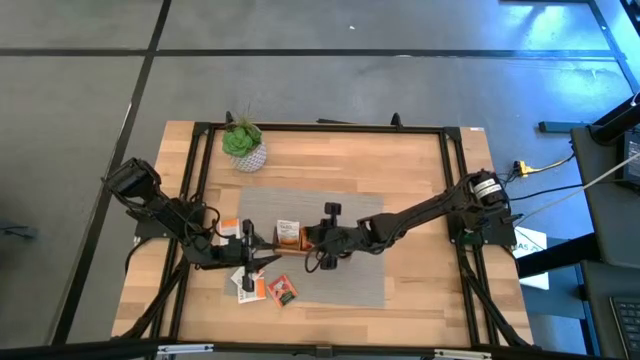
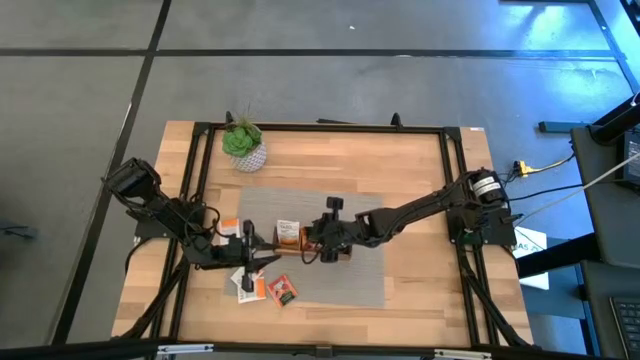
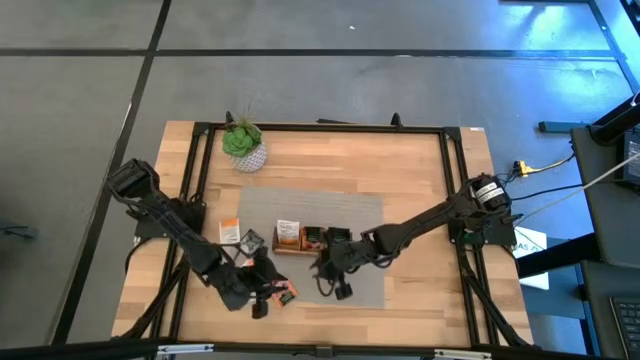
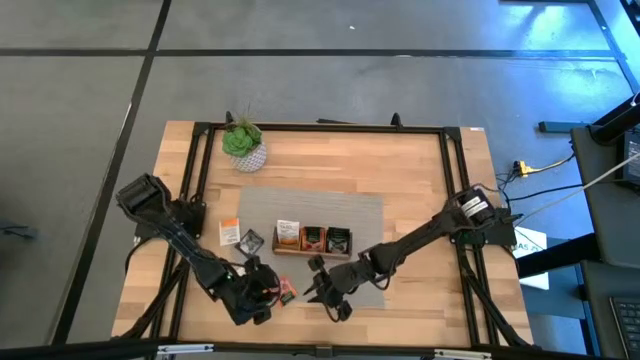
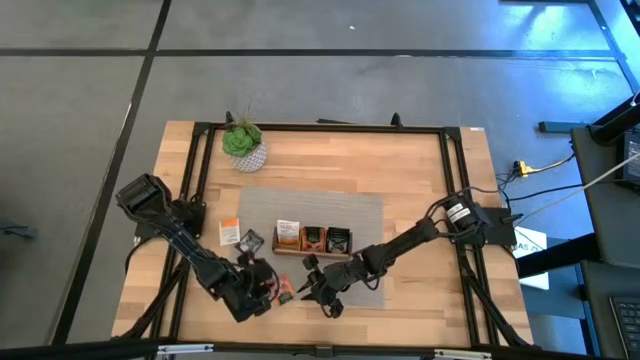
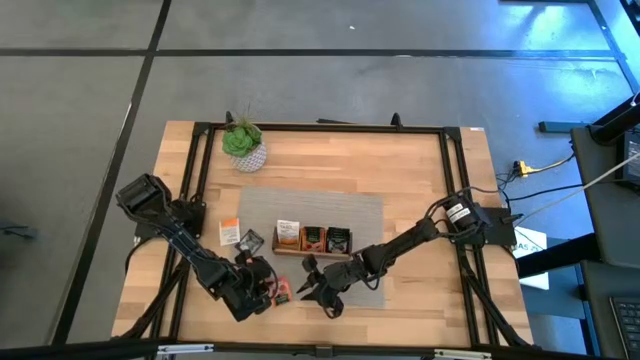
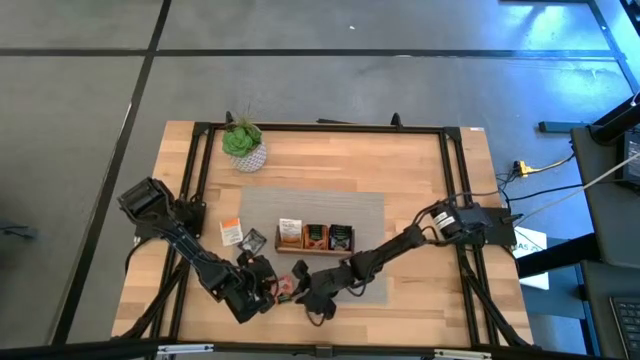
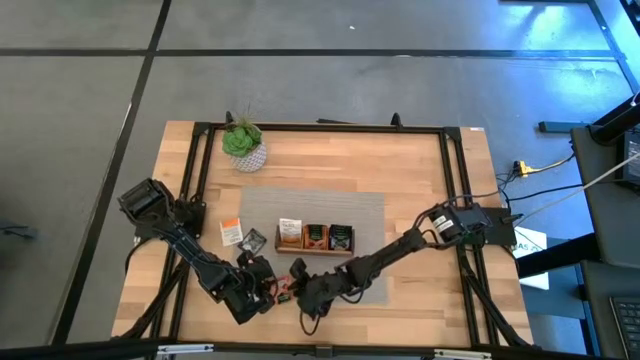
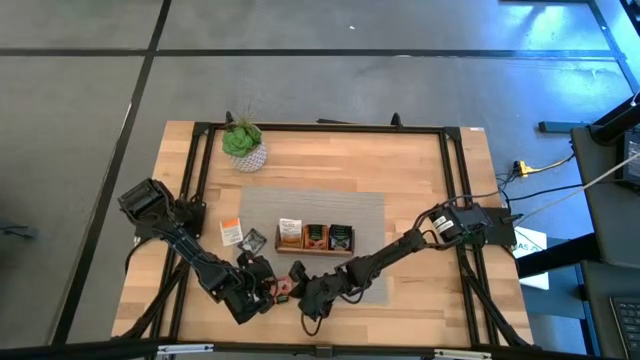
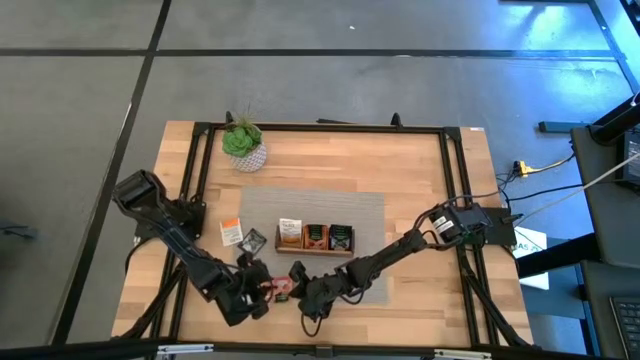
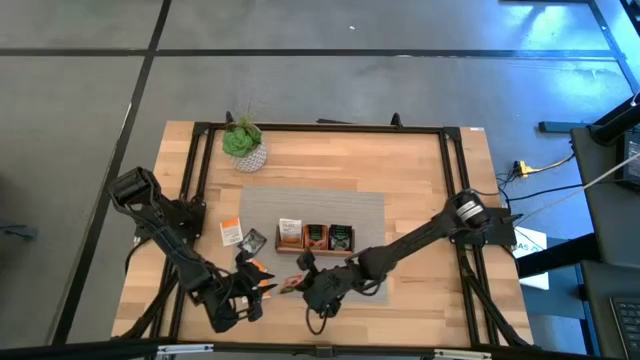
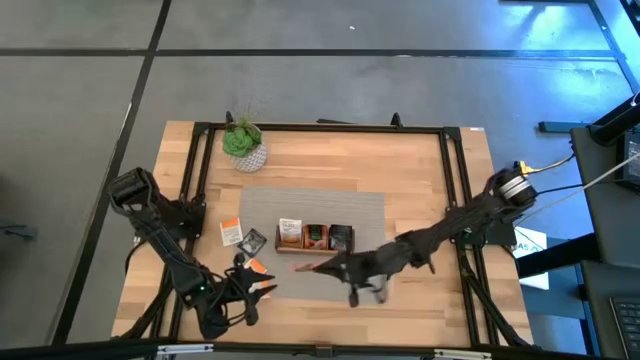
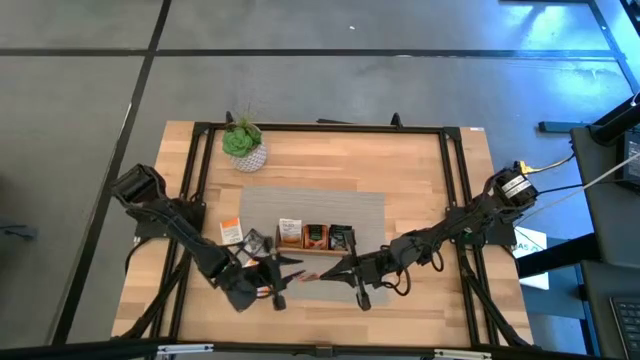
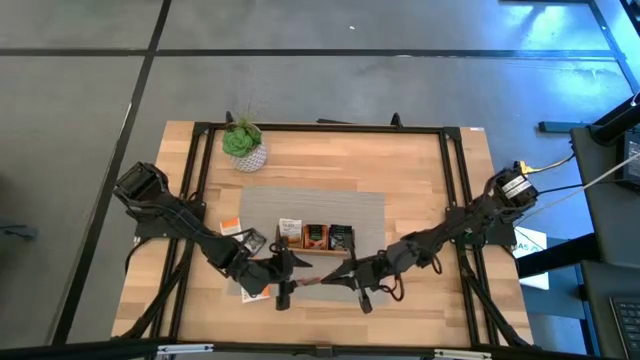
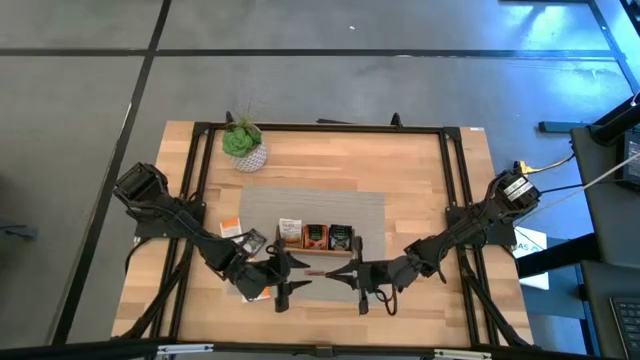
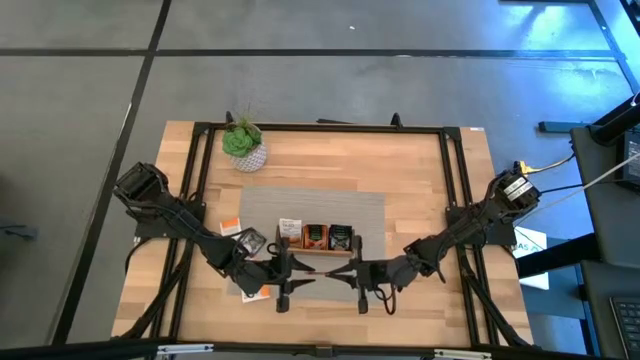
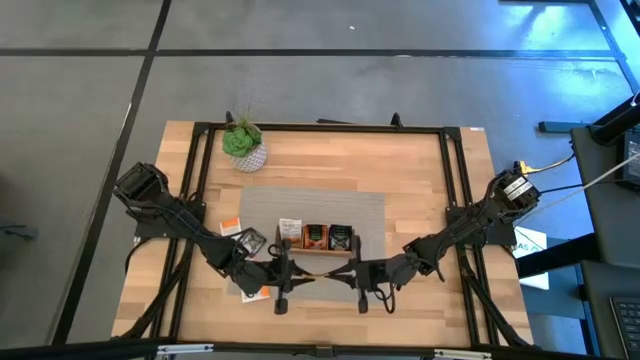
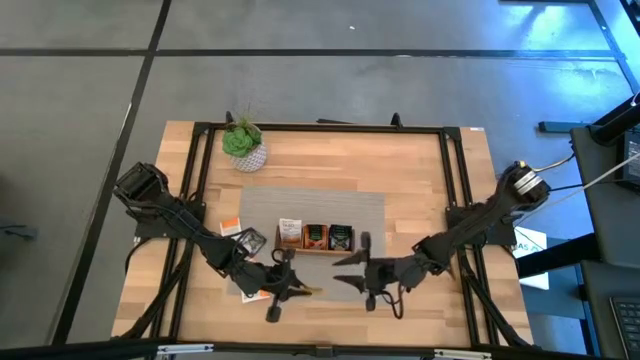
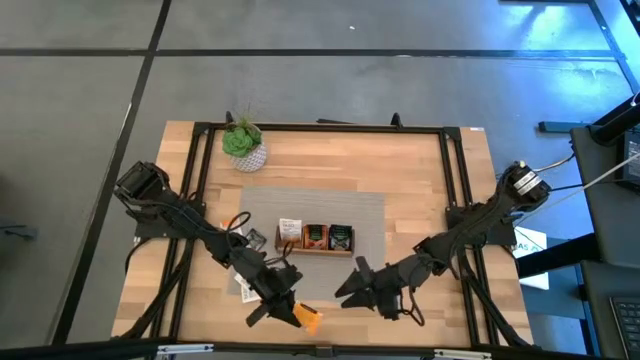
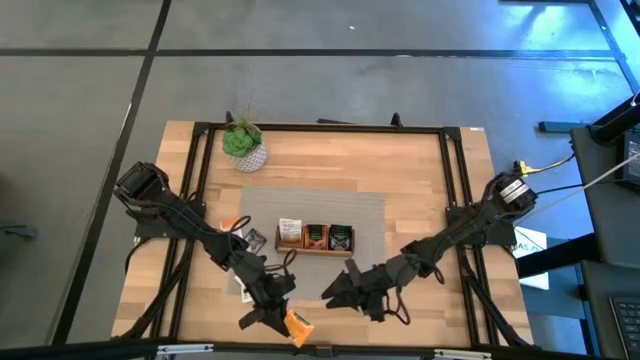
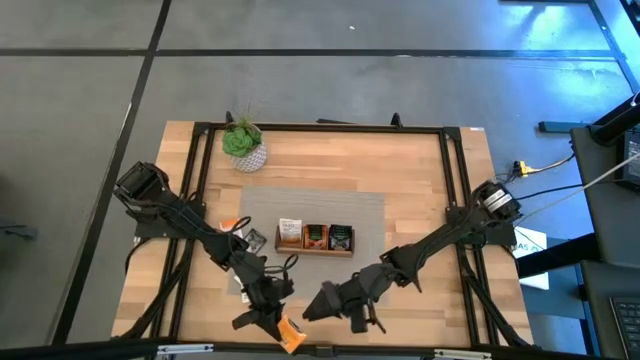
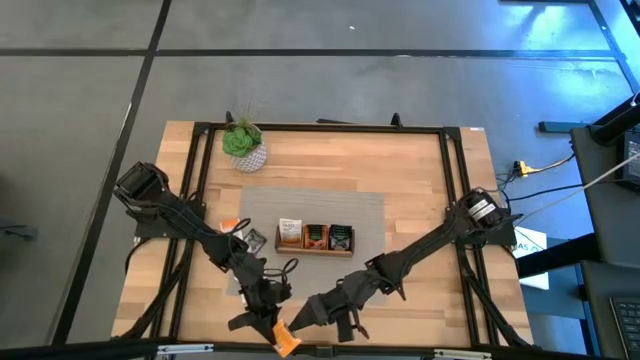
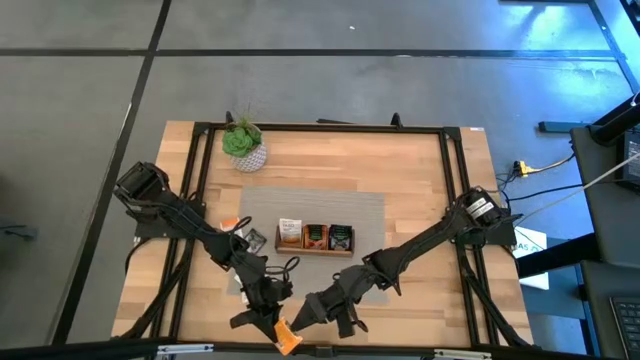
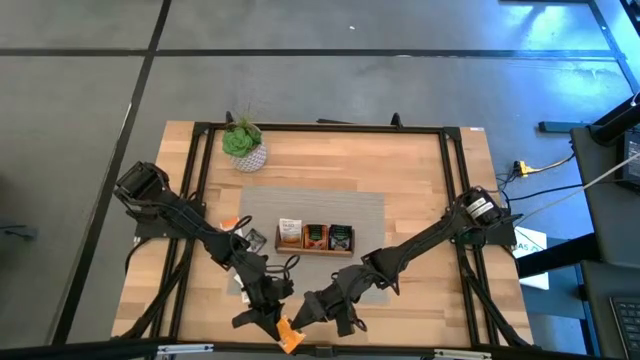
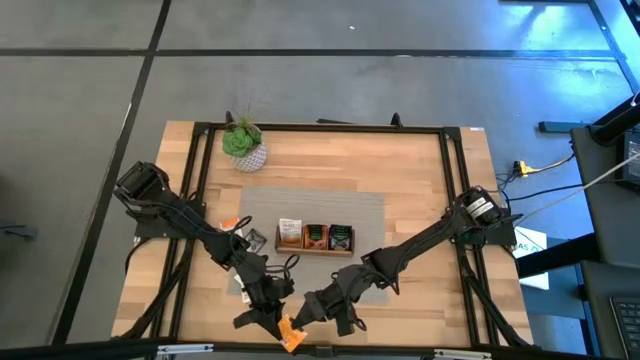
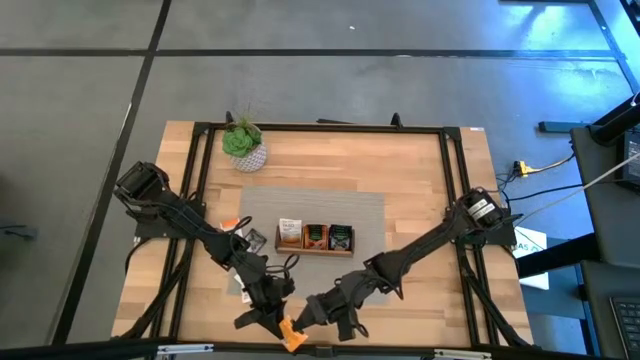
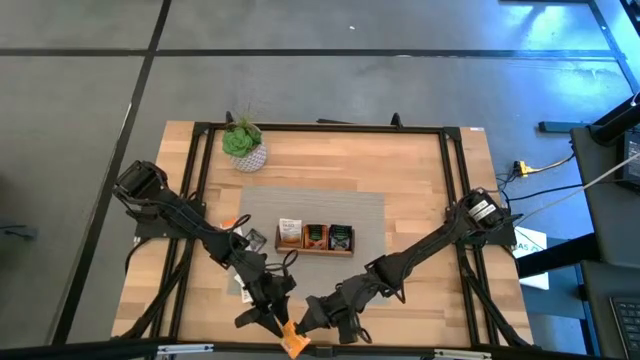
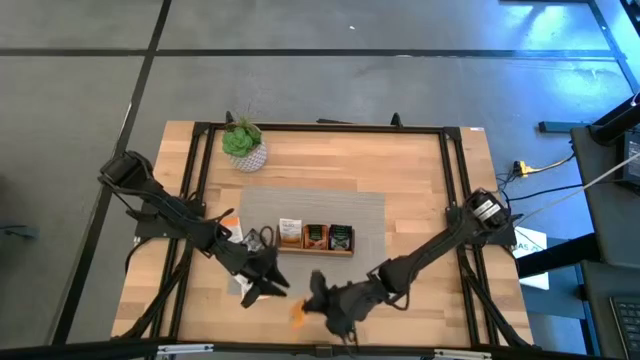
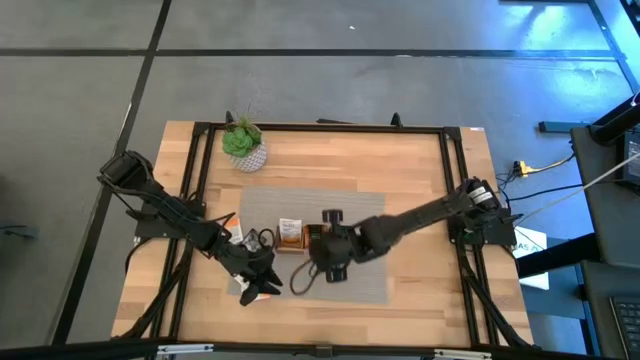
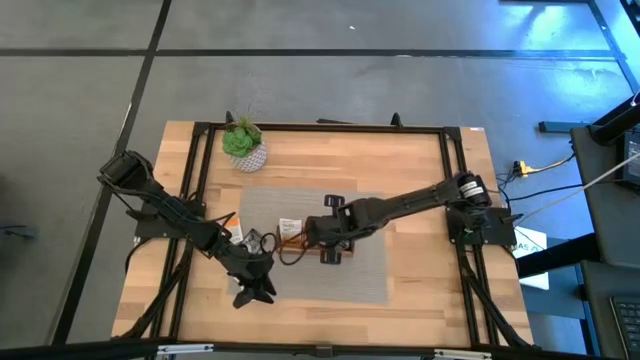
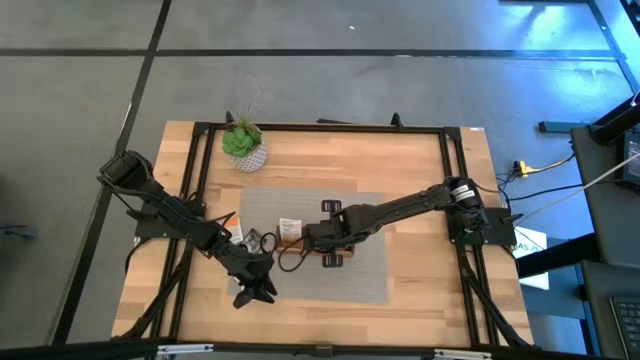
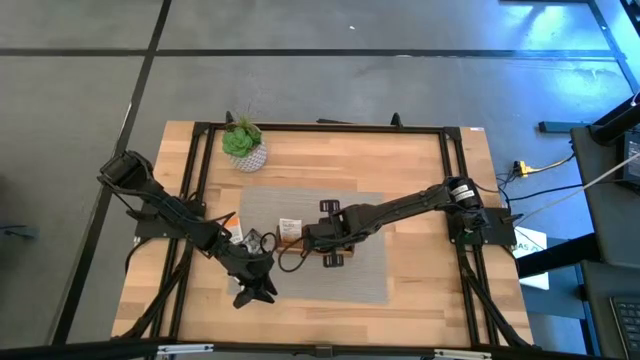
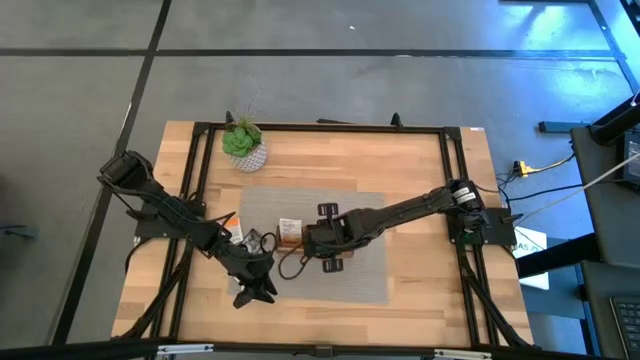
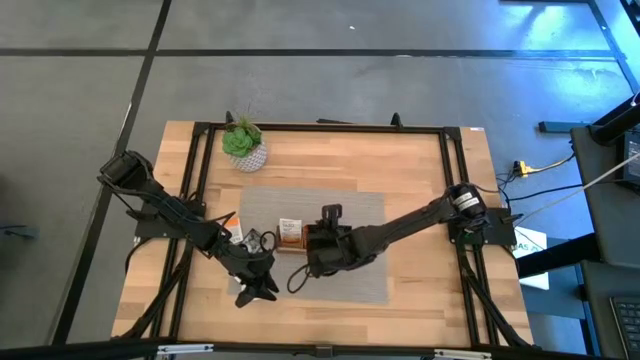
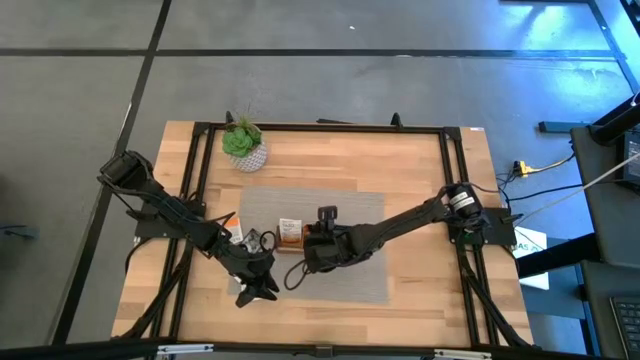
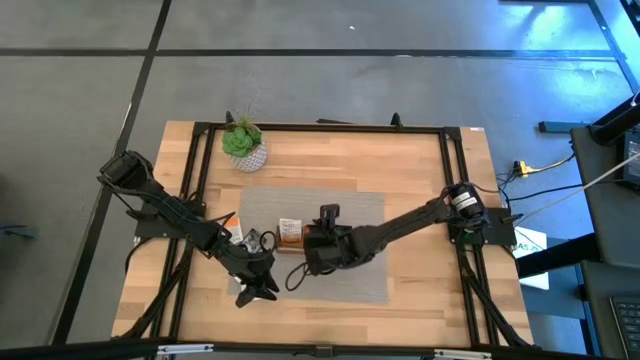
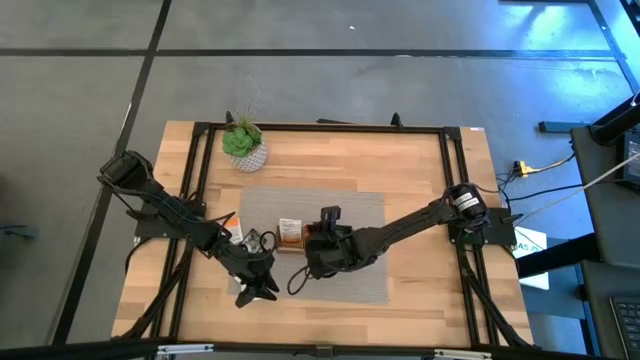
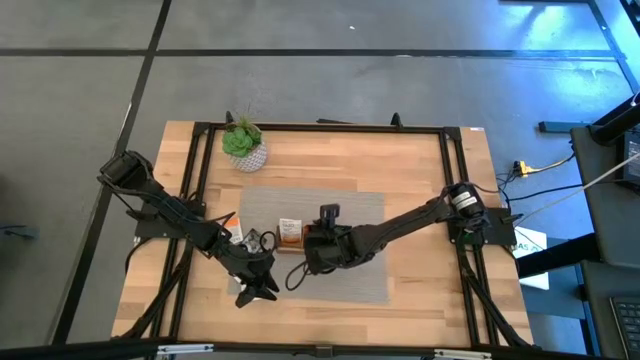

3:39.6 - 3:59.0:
Task: Pick & Place Tea
Put the orange tea bag into the middle section of the wooden organizer

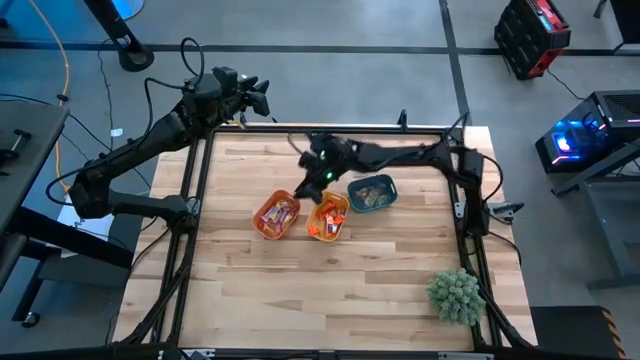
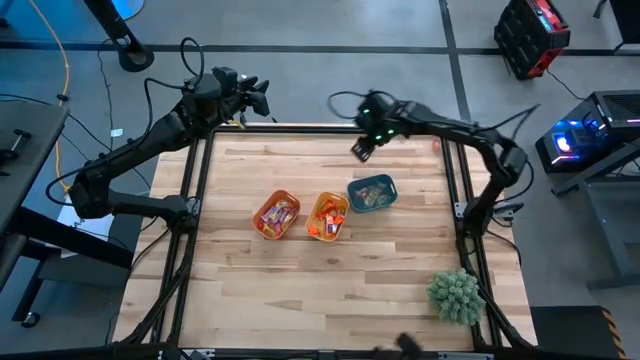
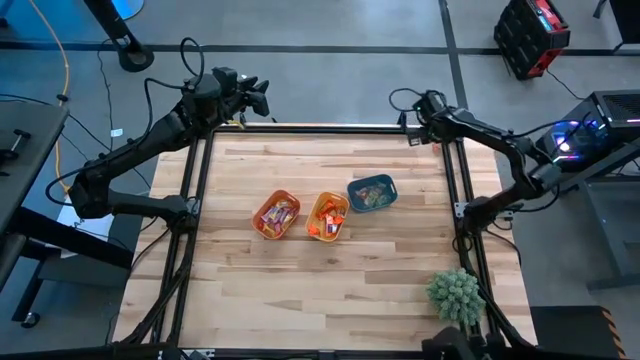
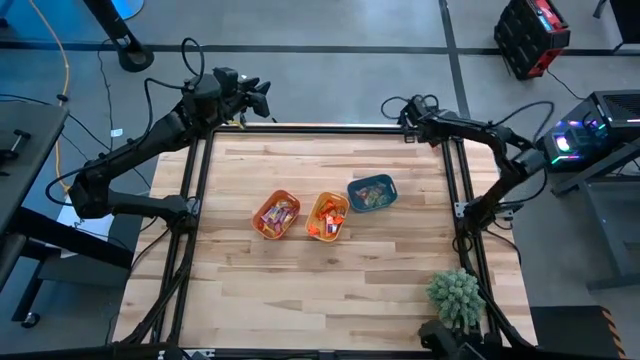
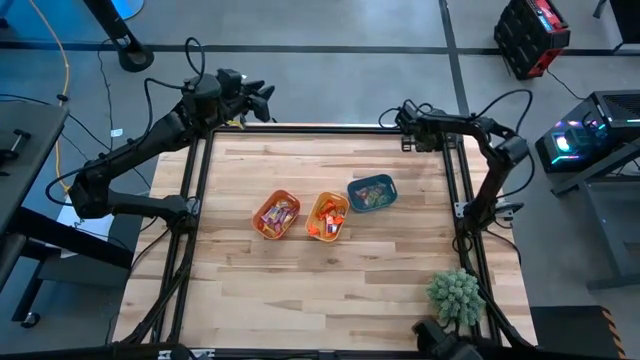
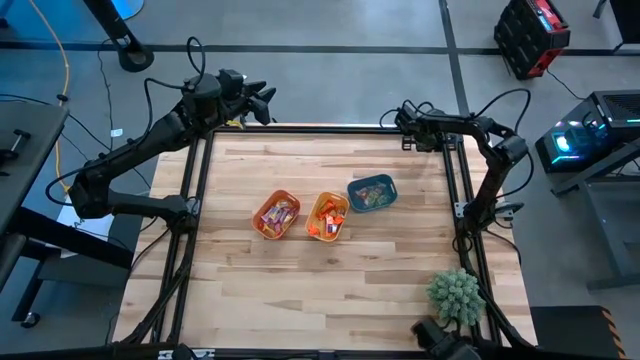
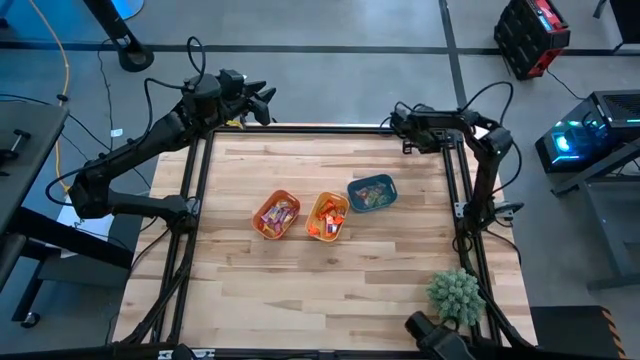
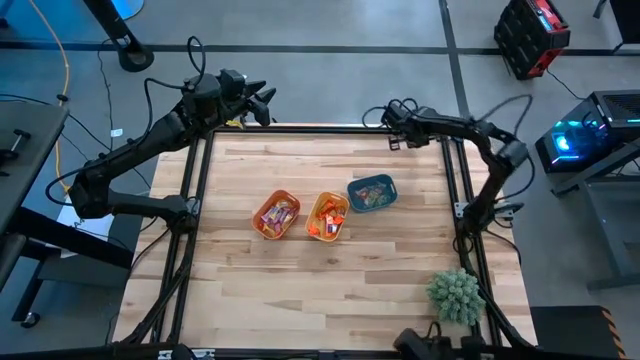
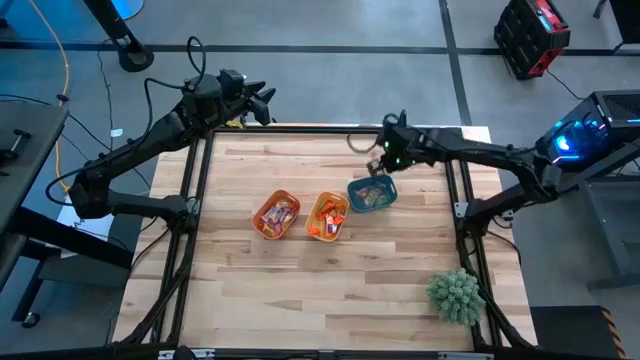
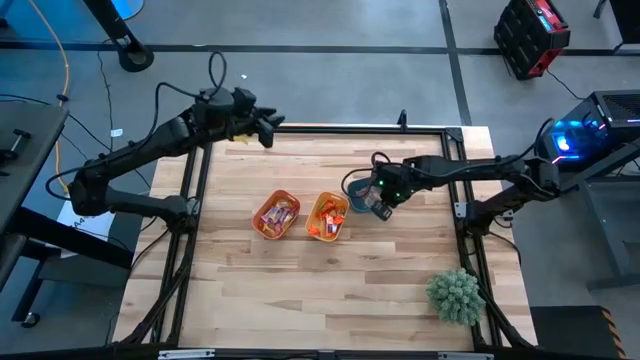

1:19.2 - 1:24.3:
Task: Sort candy
Put the orange gummy into the blue bin
